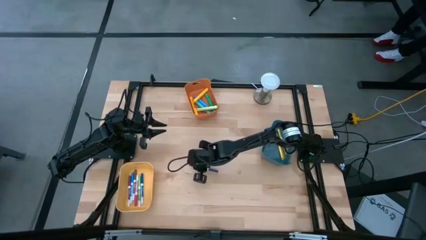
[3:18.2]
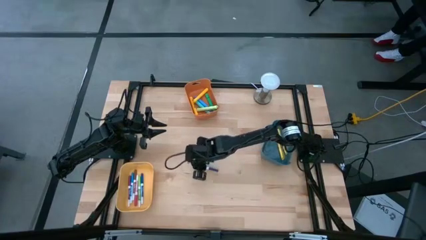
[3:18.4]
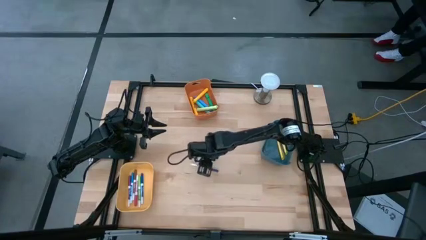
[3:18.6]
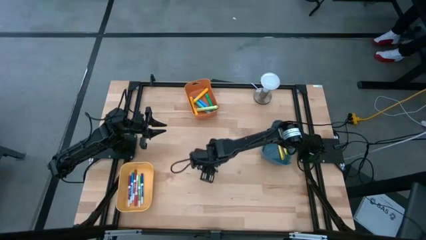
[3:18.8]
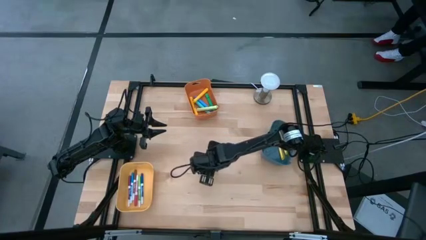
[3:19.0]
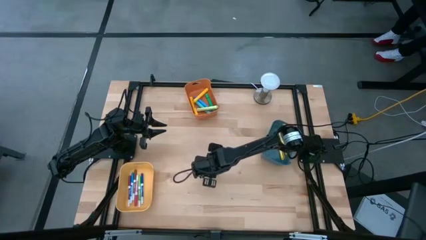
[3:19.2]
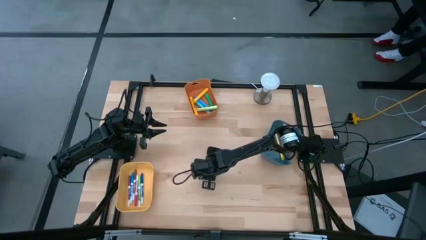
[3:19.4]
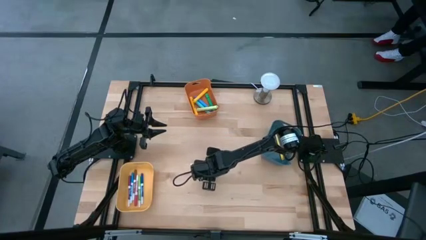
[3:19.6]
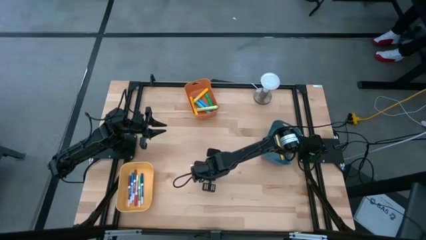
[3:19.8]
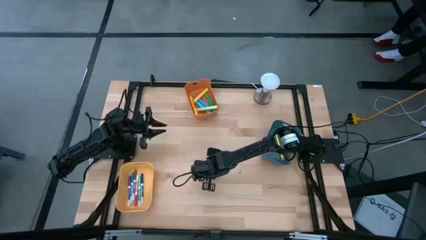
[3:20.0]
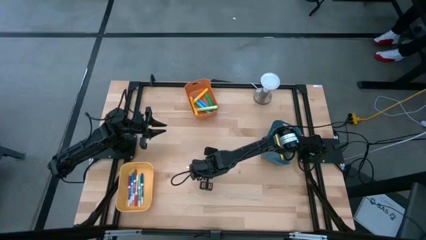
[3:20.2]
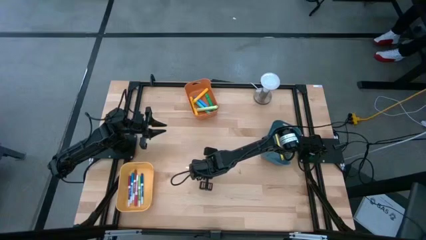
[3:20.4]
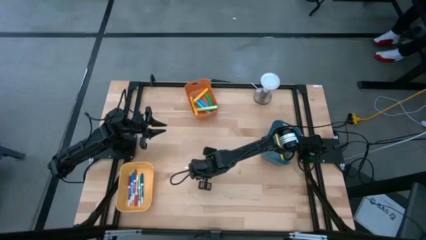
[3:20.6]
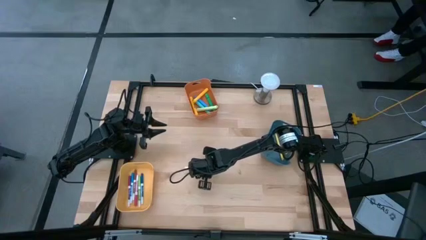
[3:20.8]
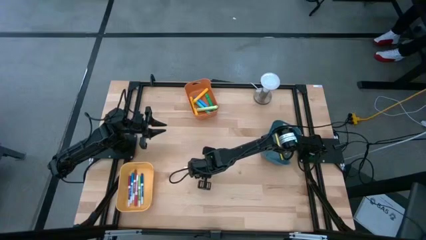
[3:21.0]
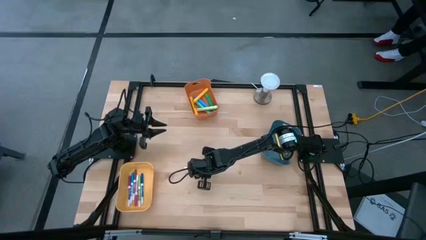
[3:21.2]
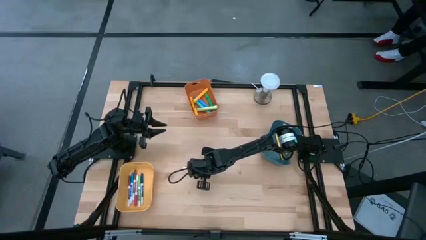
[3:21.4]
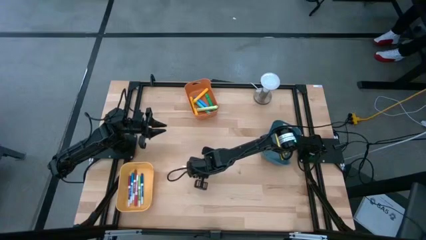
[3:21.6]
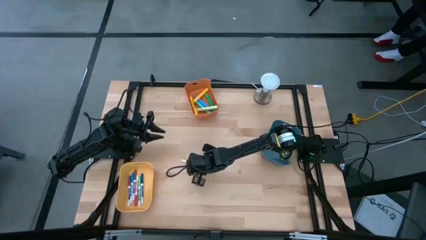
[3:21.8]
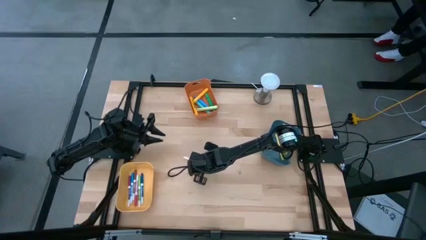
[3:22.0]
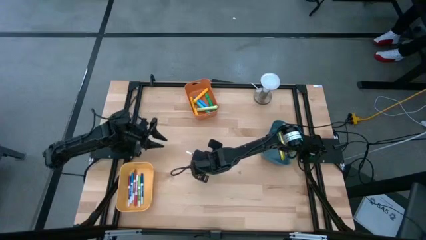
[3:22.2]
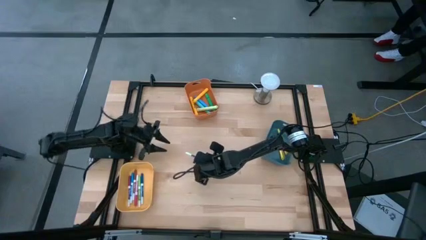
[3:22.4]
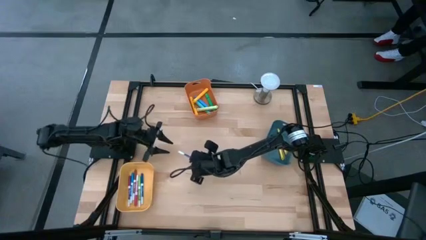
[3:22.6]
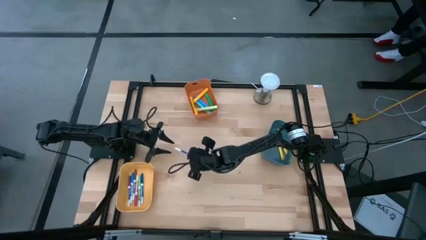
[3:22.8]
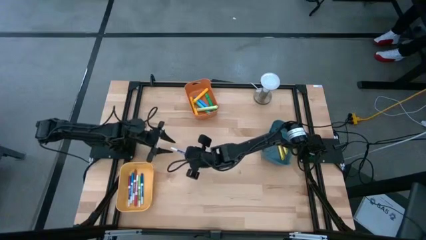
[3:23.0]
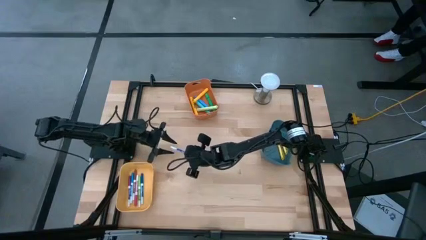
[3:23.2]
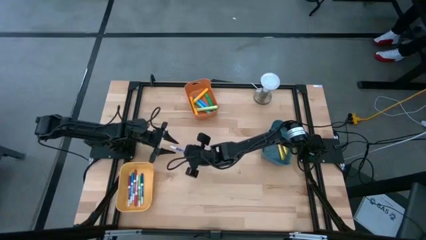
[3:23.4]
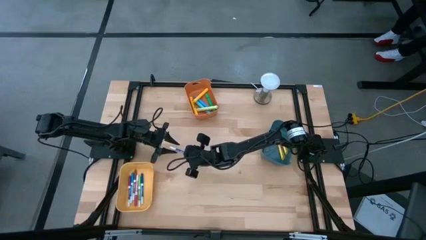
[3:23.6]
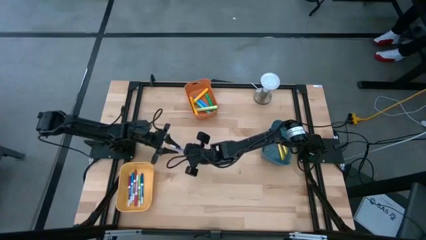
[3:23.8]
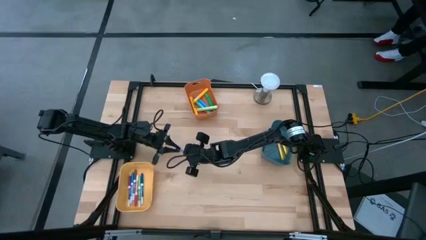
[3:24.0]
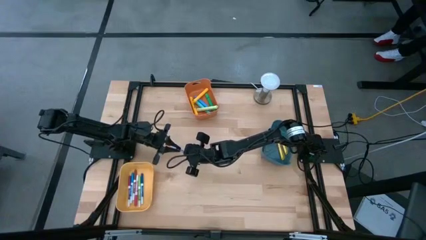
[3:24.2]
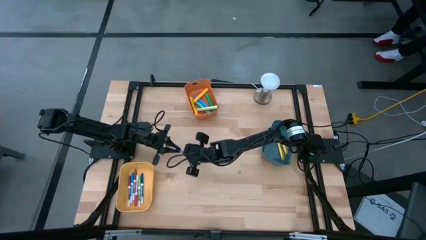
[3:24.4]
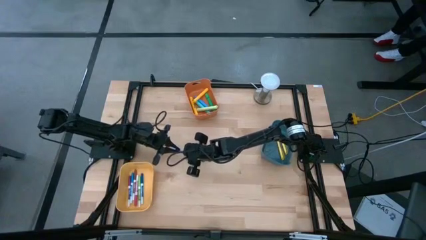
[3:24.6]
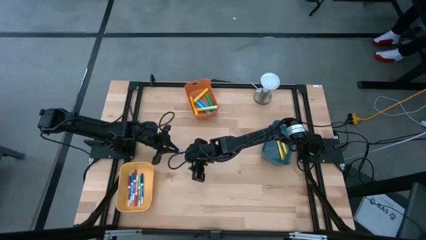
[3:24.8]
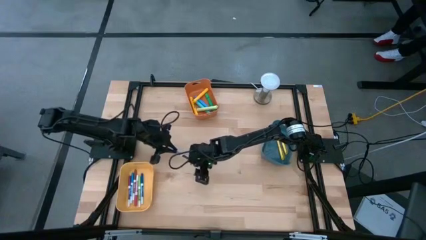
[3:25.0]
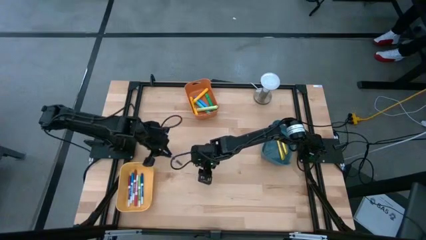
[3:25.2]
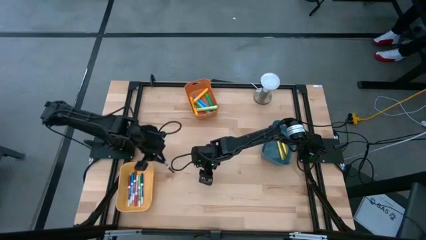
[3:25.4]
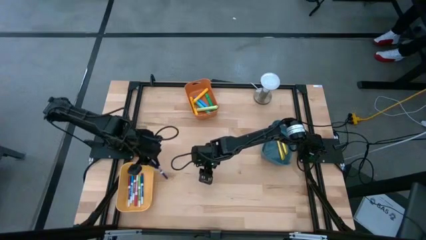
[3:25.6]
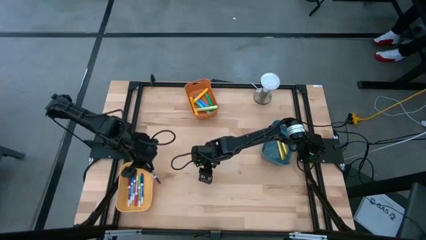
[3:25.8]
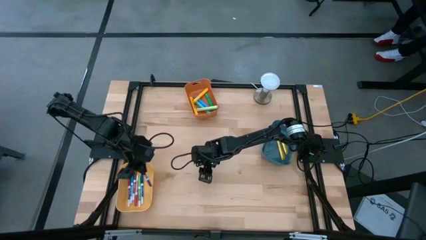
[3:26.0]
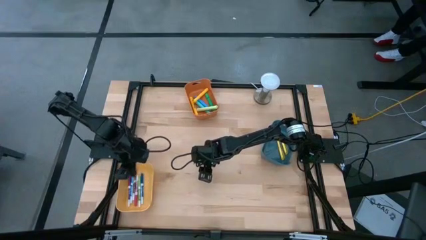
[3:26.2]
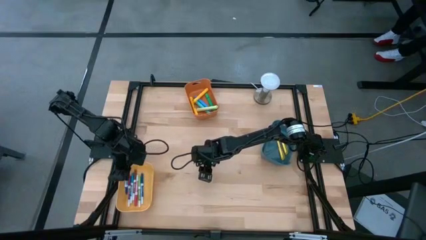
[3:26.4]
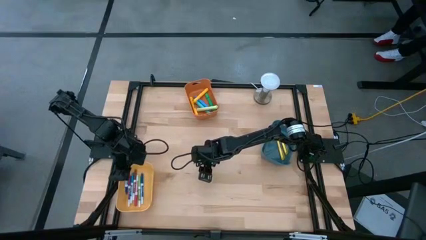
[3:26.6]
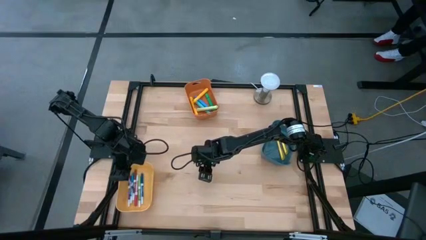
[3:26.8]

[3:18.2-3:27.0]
Task: Pick & Place Markers
Put the dark blue marker pen into the yellow bin

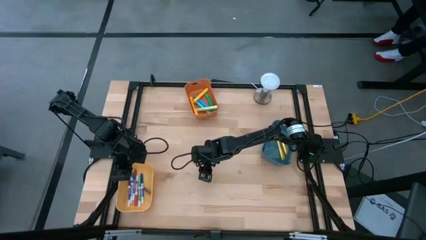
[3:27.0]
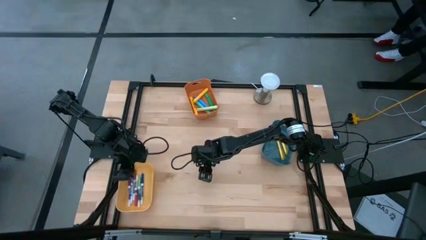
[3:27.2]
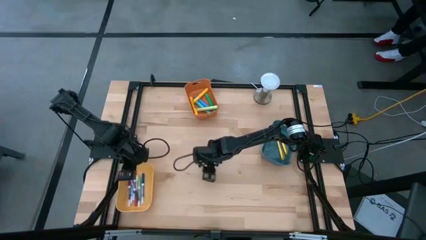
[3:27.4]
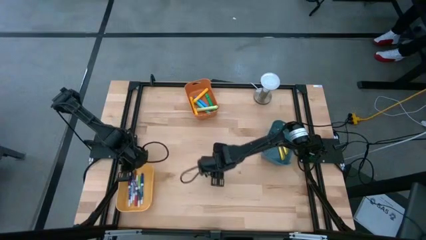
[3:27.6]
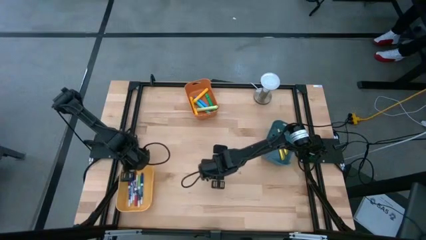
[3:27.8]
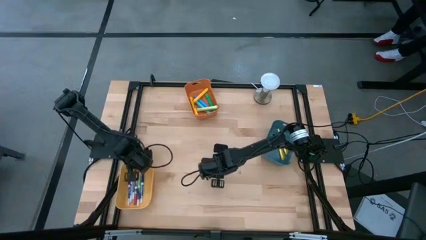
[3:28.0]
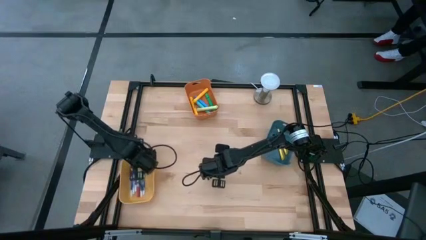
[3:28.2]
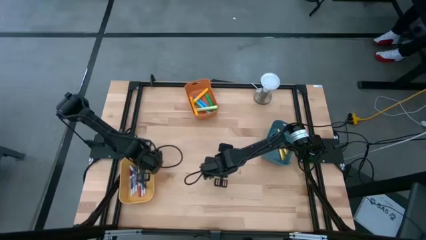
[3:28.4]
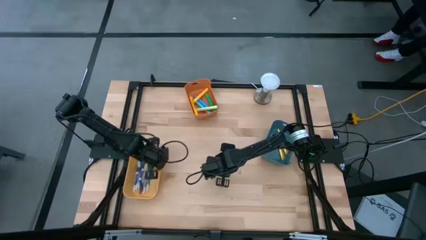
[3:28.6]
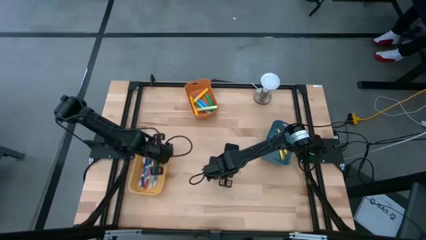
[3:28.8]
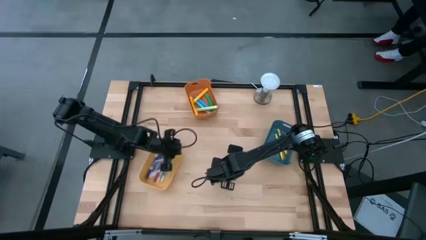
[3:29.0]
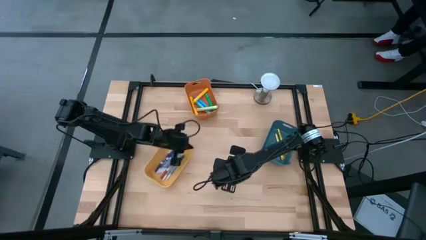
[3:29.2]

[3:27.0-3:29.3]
Move the yellow bin towards the center of the table

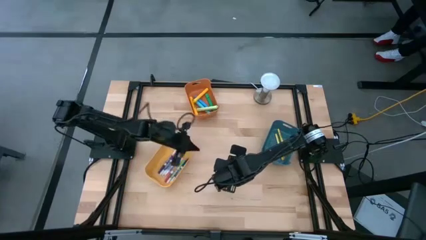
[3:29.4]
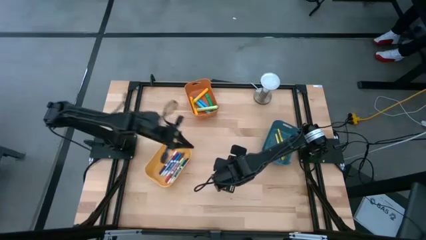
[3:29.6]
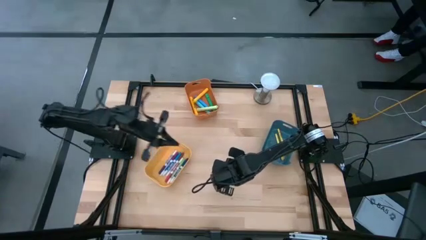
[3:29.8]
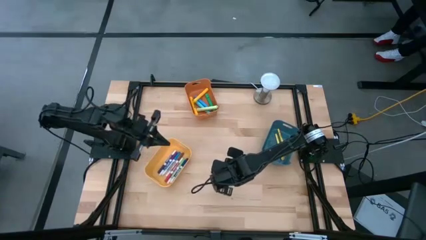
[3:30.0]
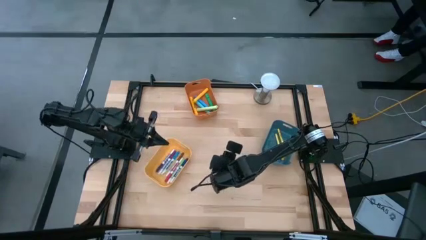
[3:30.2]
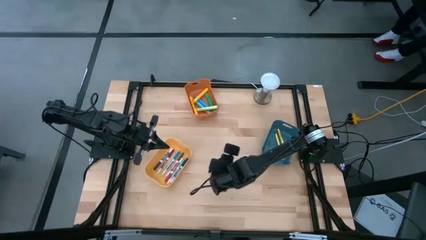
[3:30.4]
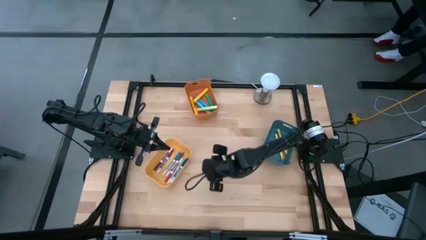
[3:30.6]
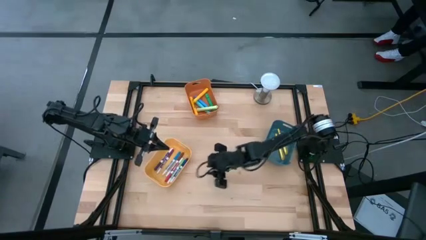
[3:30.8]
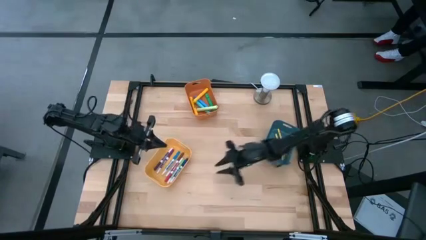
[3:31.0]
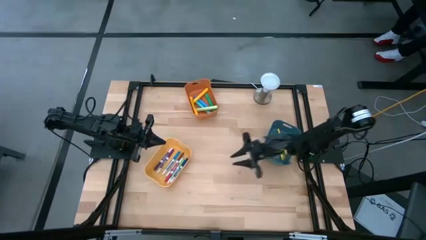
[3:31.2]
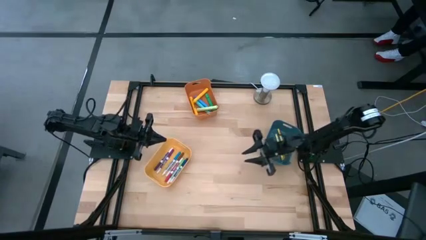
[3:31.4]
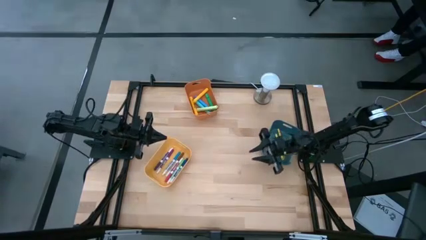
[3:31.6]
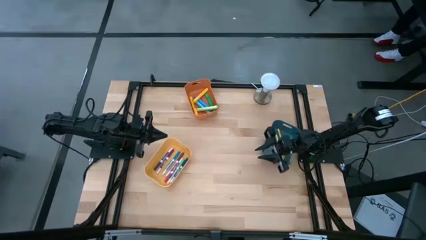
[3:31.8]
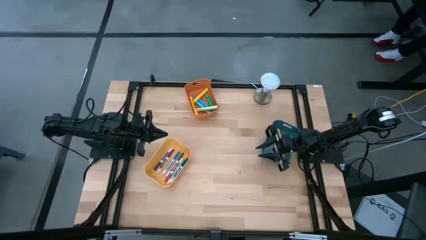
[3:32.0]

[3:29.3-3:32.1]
Return to Home Position

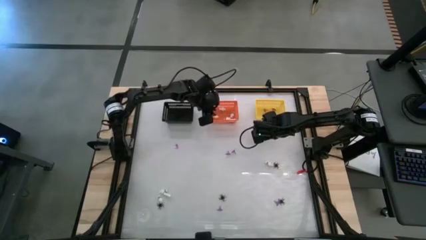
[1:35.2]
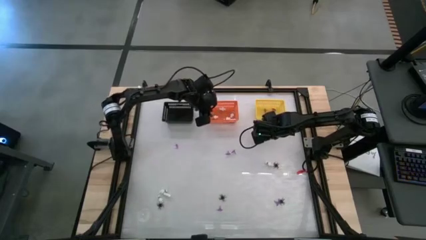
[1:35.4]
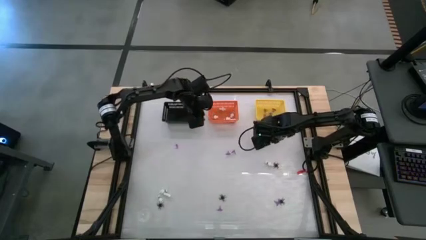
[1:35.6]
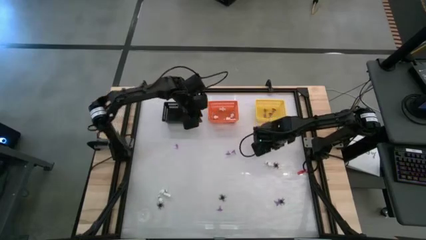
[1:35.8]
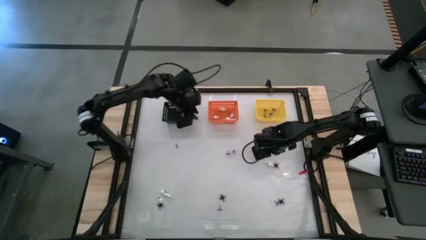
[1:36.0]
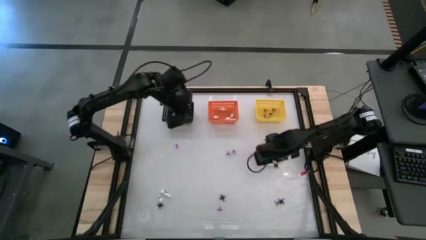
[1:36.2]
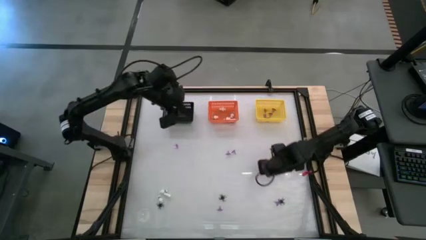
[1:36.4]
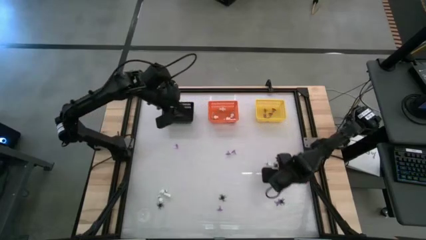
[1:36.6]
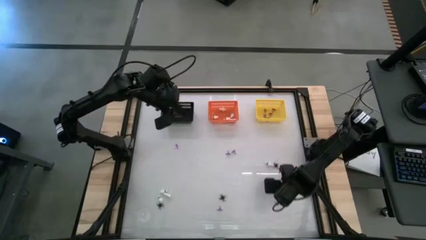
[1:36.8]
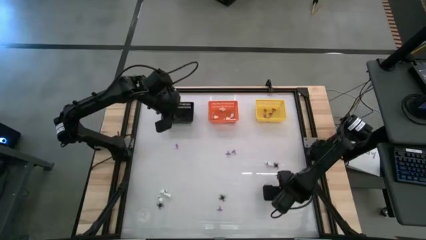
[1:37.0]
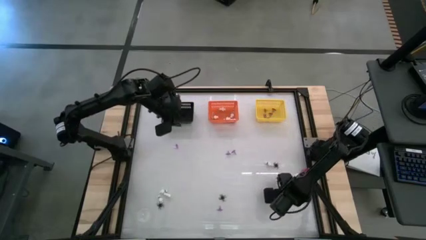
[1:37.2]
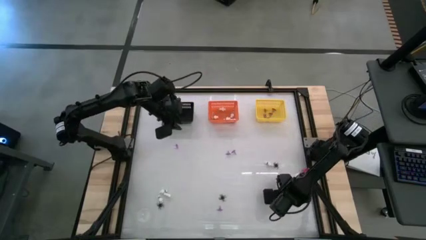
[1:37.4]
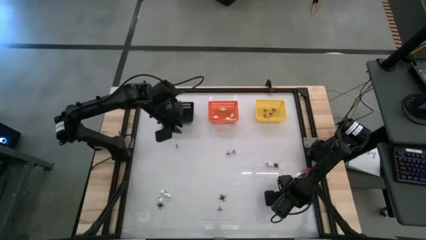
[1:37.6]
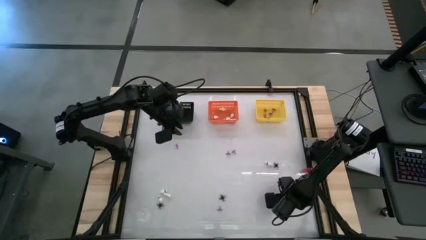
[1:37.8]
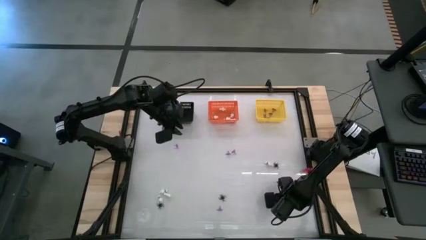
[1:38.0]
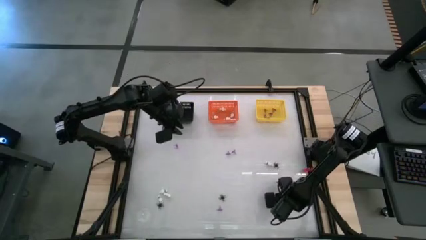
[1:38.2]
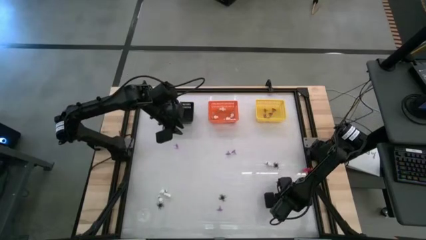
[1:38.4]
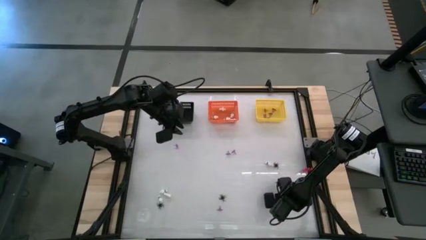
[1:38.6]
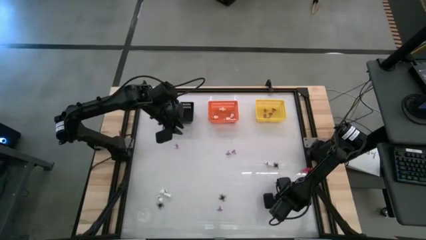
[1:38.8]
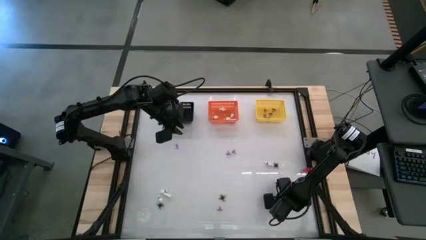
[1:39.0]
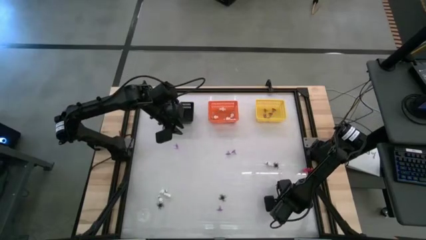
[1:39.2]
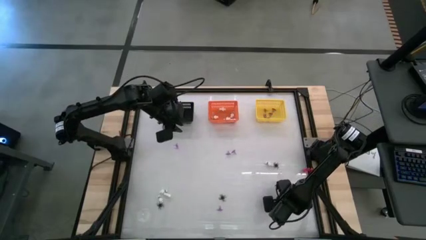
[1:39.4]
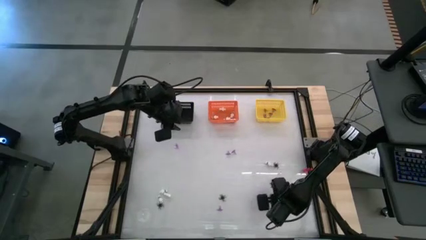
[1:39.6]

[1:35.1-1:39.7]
Task: Sort Halloween decoration
Put the spider toy into the black bin
